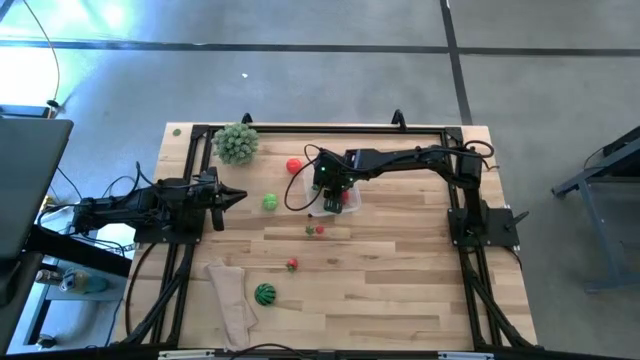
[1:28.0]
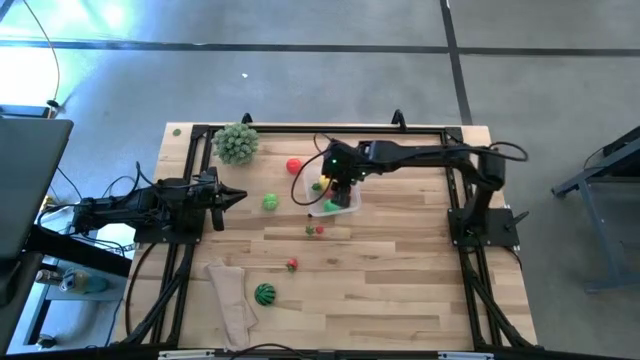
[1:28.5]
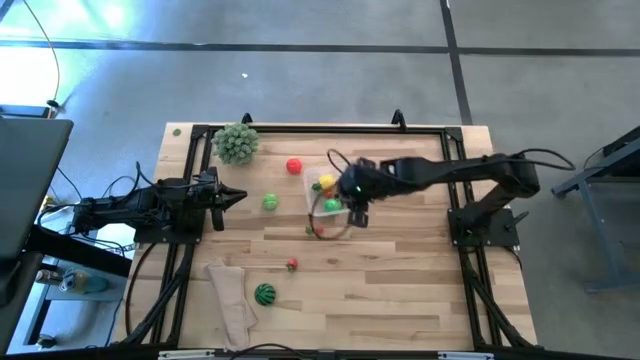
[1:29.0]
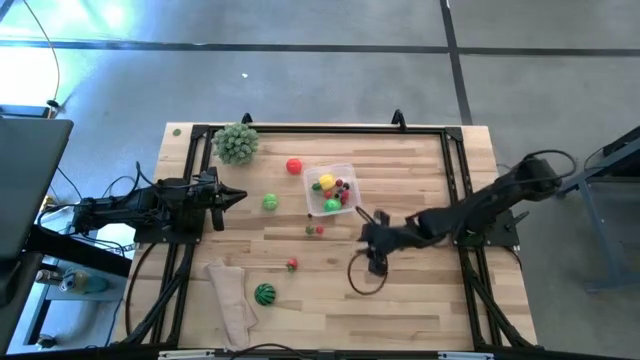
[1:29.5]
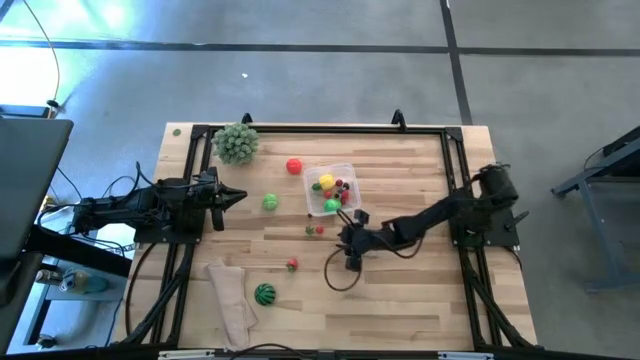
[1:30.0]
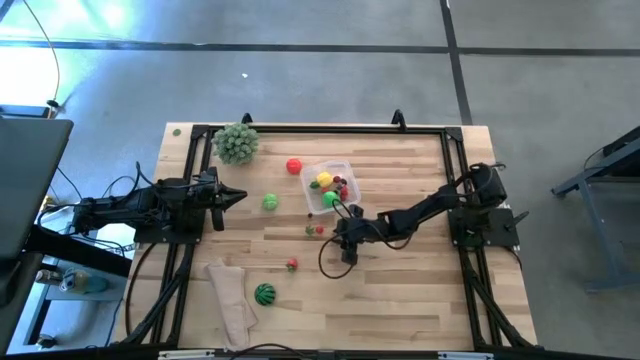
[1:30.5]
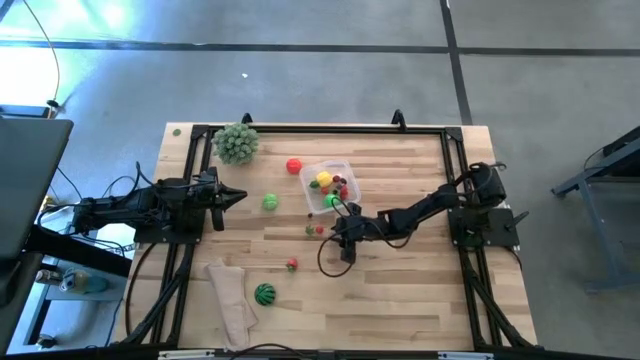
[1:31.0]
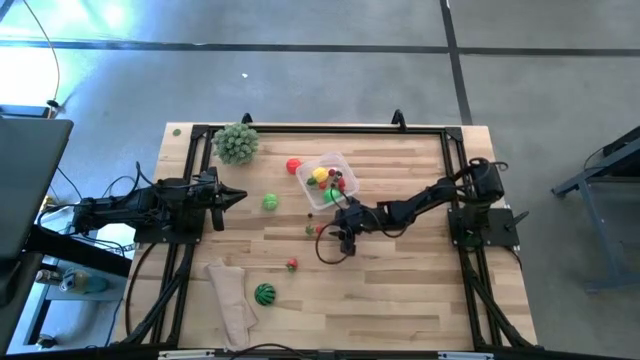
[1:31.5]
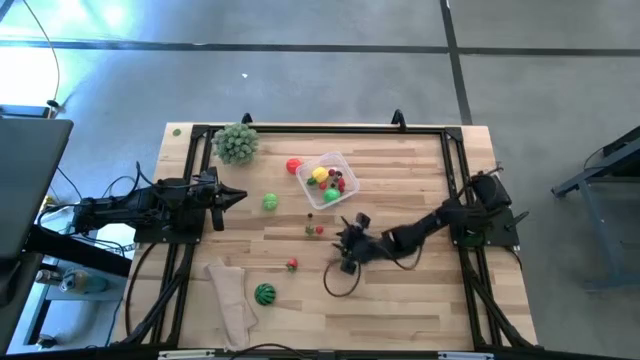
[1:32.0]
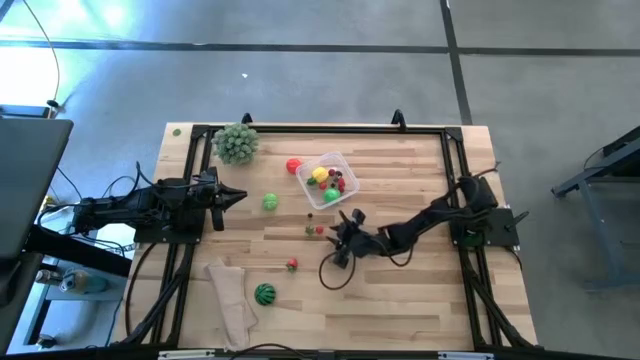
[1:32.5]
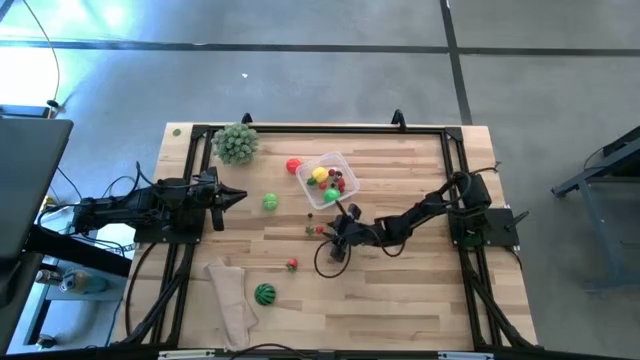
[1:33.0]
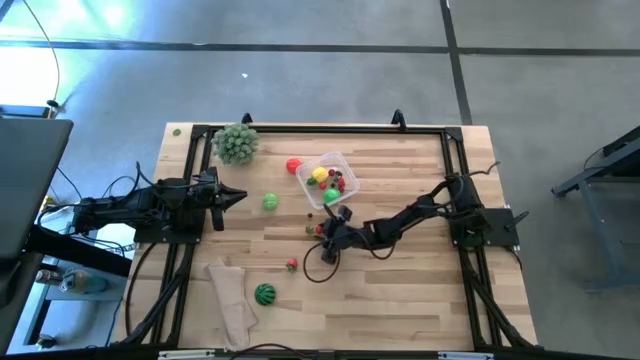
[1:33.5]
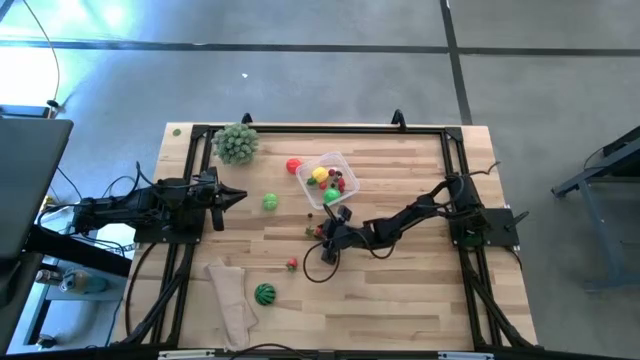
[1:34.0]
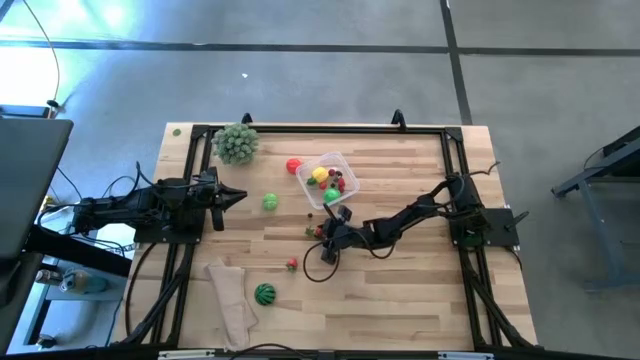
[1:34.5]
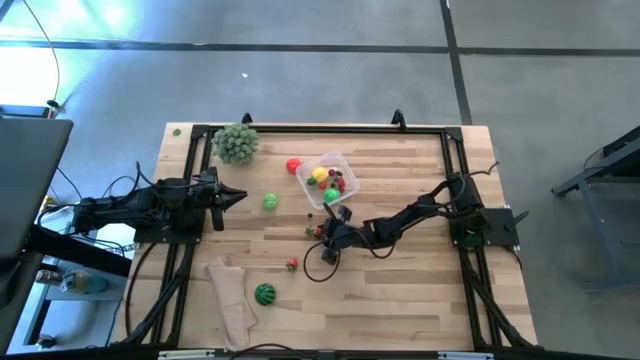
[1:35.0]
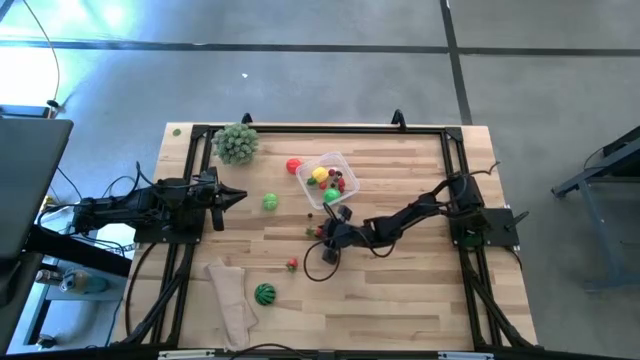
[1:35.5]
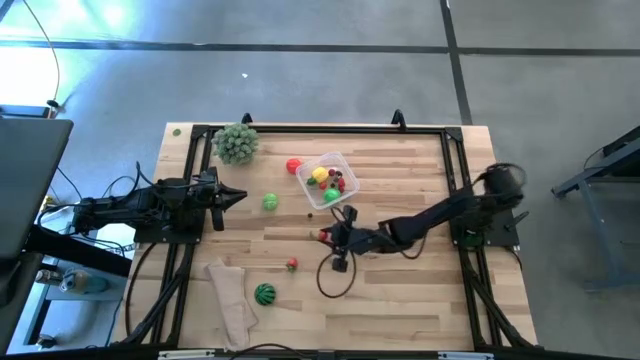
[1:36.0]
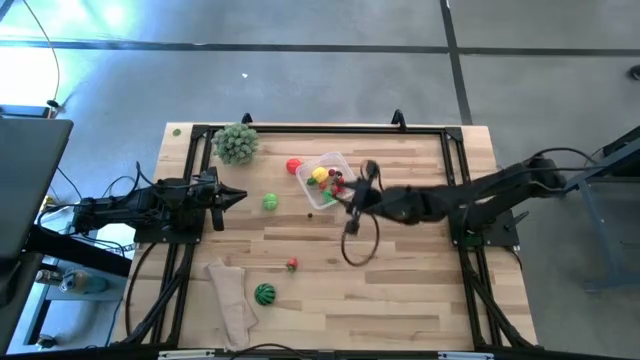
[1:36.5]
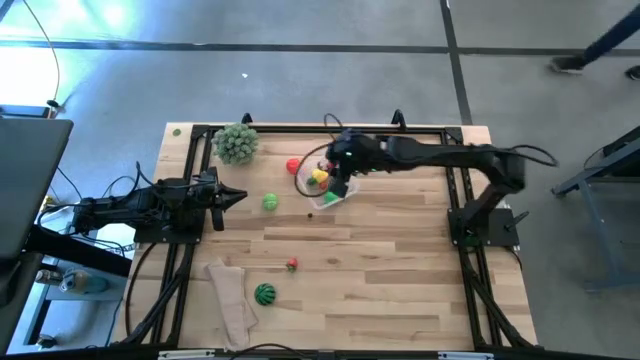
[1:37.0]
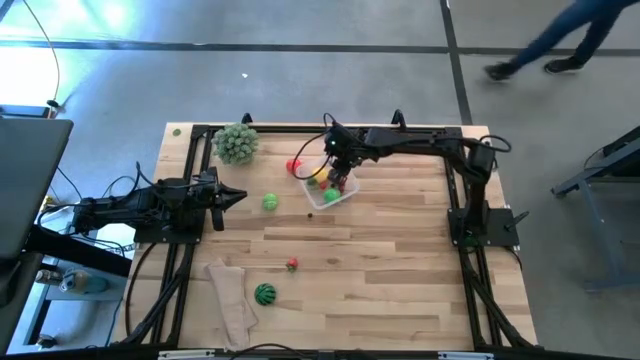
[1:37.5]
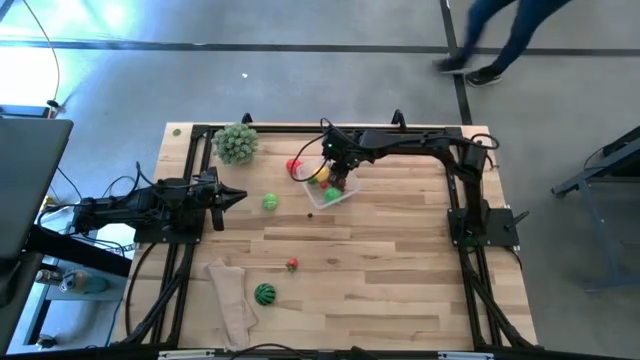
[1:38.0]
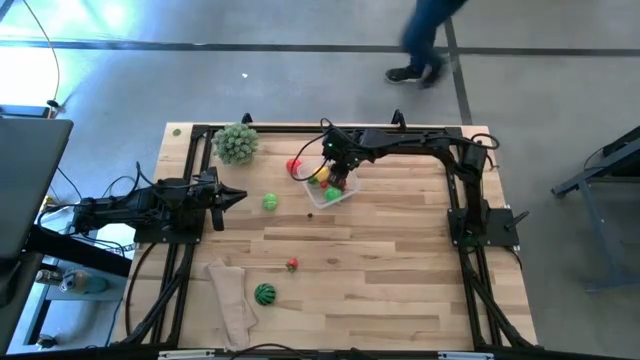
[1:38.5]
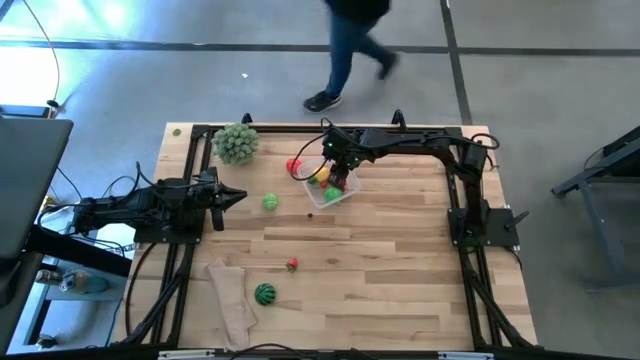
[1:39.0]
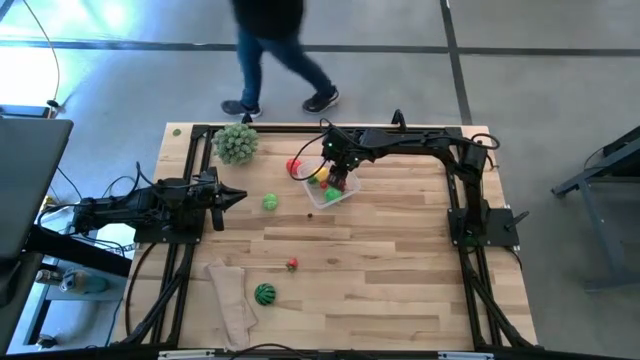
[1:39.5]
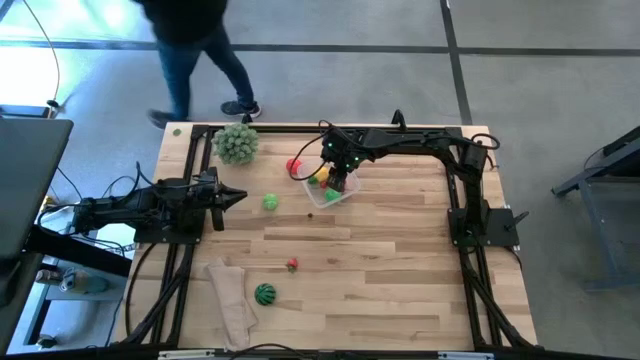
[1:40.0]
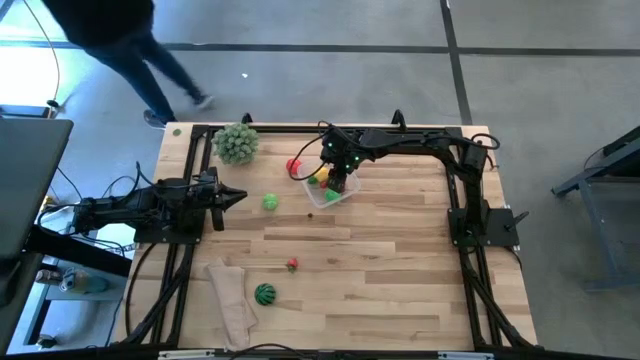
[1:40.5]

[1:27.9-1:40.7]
Task: Pick and placing Produce into tupperware
Put the red cherry into the transparent container

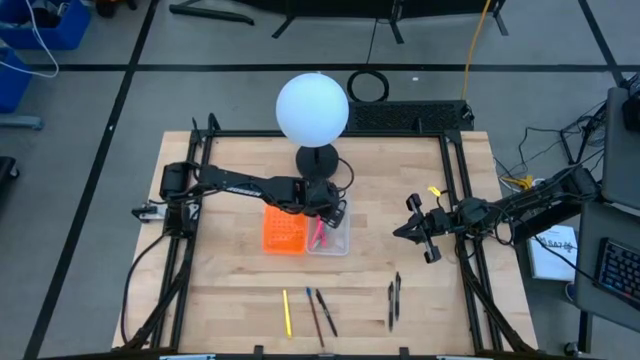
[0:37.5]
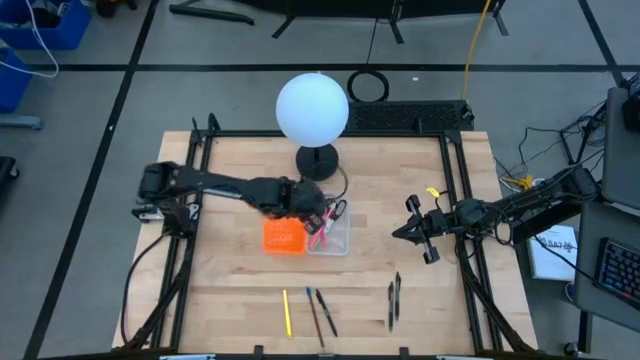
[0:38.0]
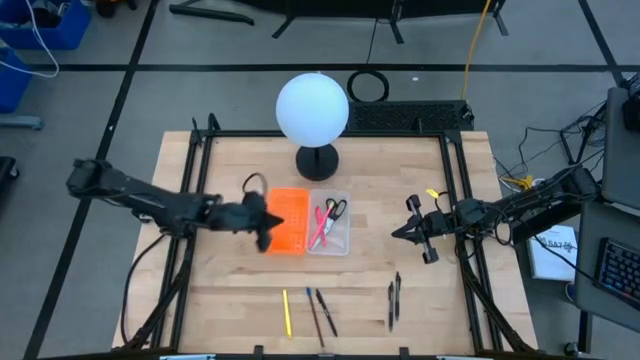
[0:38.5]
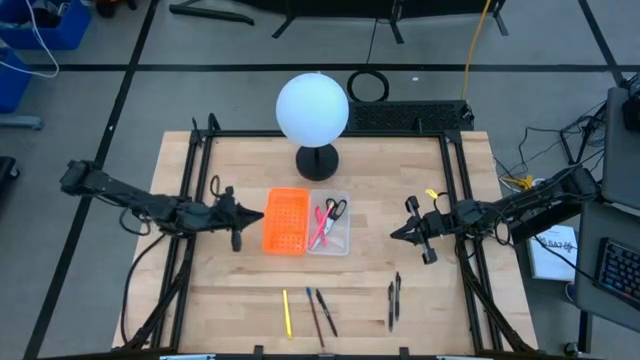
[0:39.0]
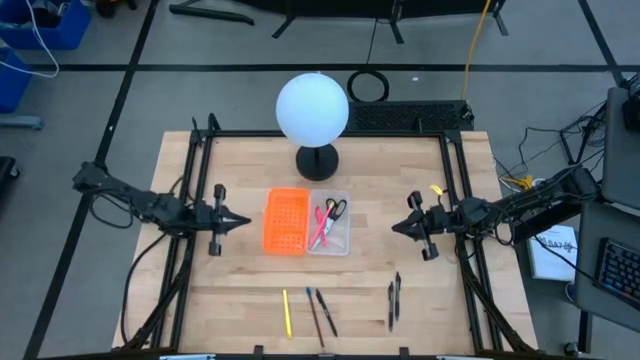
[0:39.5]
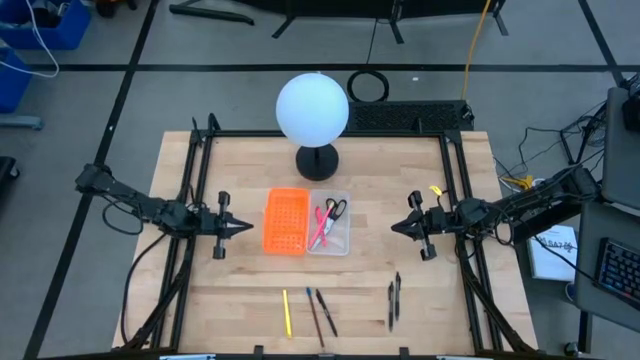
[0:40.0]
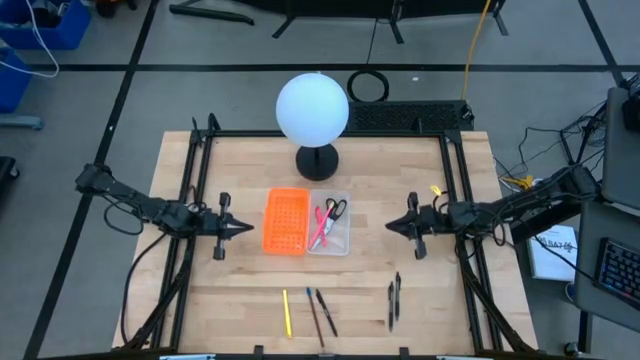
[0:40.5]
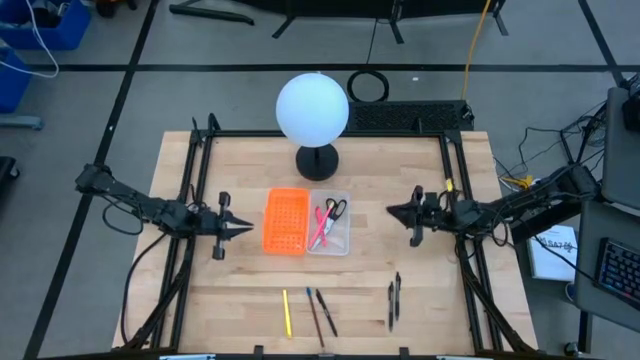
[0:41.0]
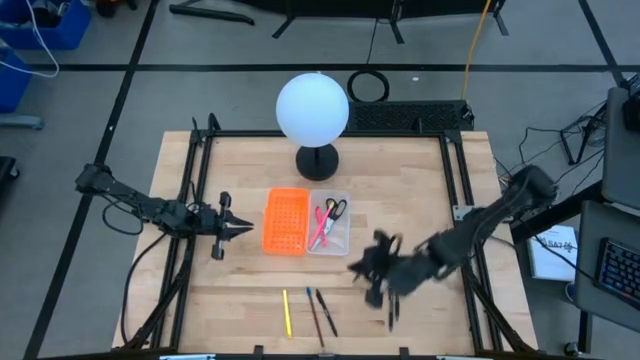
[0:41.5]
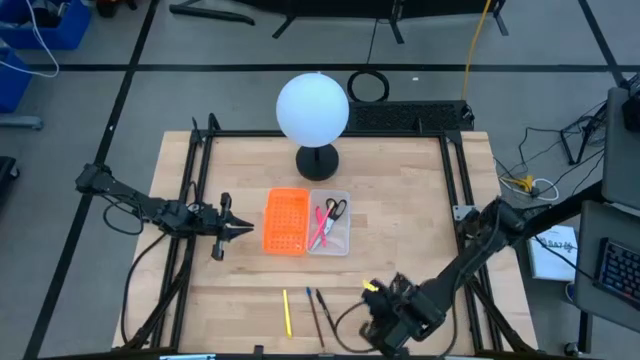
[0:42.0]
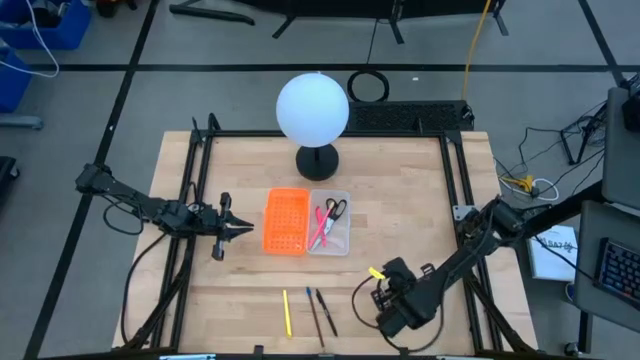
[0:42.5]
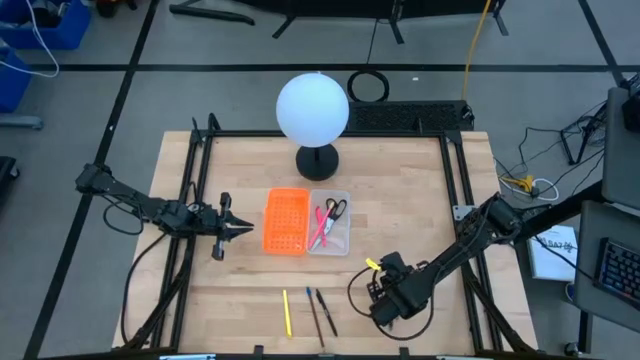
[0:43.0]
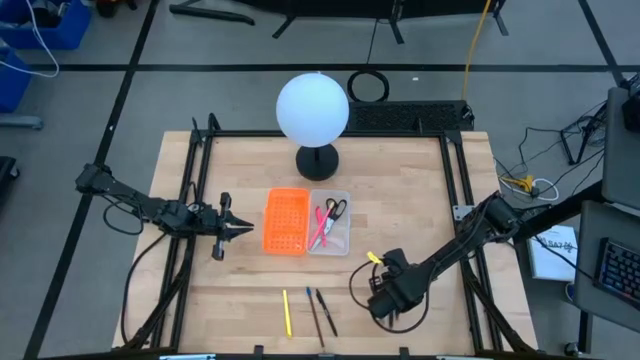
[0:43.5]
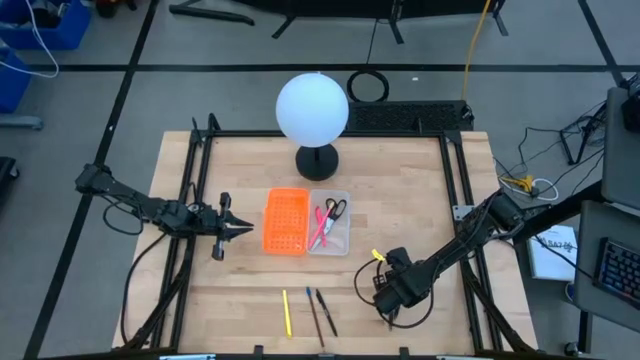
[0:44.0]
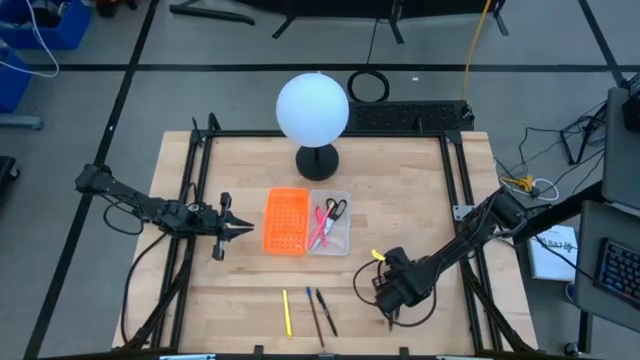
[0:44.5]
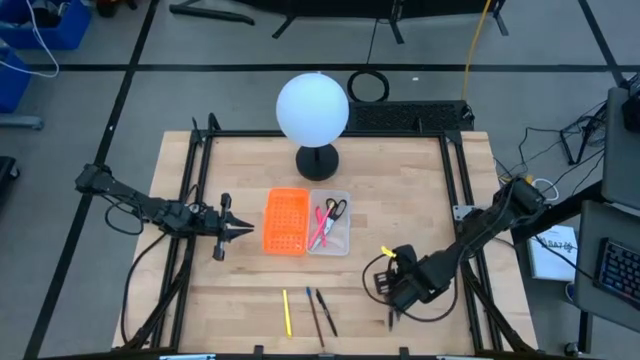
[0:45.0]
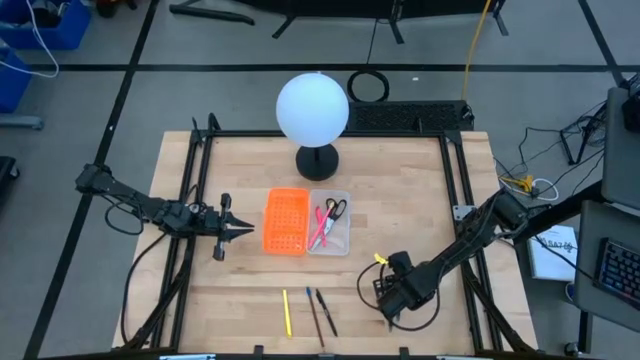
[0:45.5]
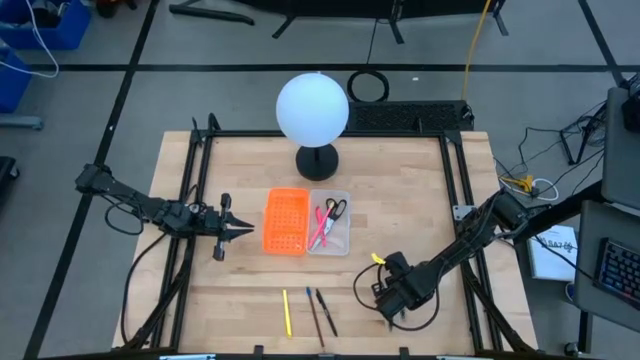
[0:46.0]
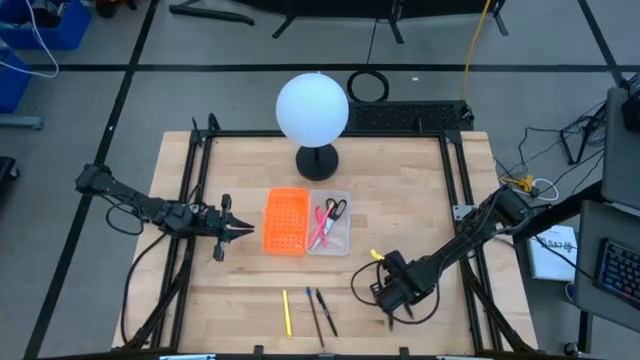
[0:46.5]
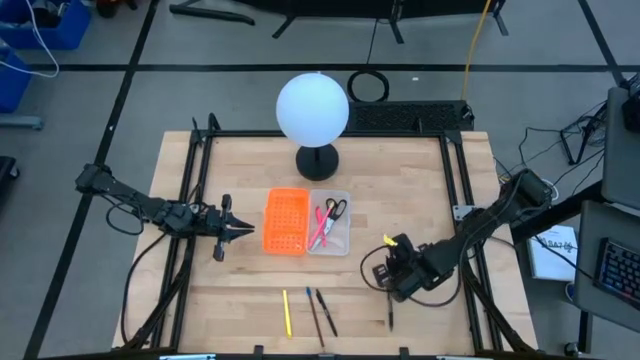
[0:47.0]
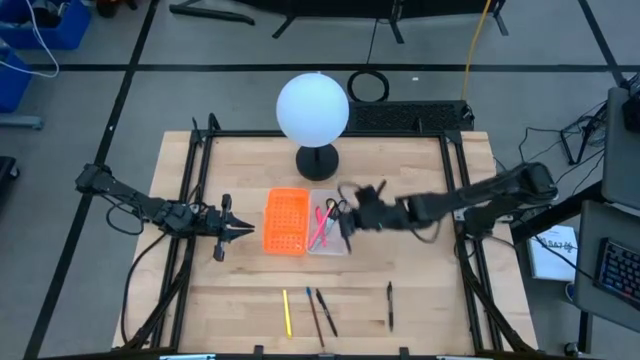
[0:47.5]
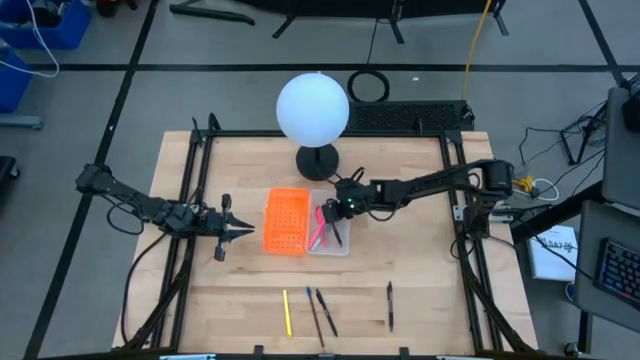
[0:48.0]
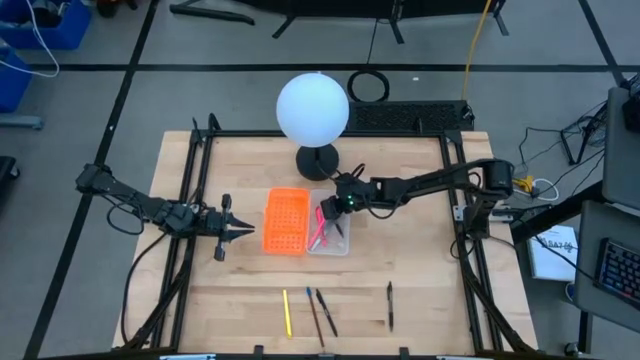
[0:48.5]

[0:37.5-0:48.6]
Task: Pick & place school supplies into a supply box
Put the right black pen into the orange supply box
